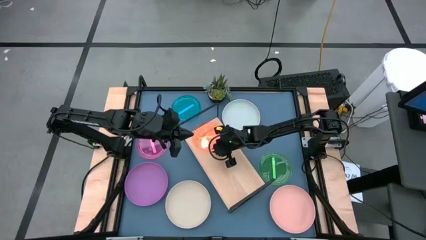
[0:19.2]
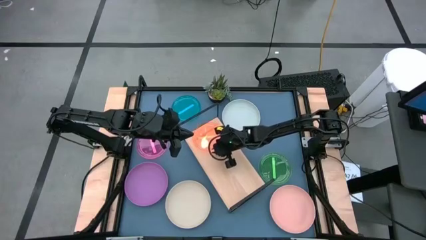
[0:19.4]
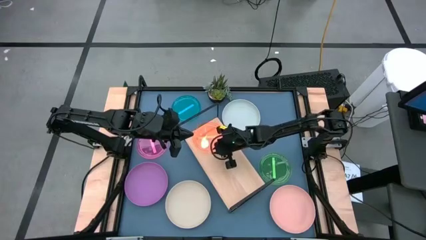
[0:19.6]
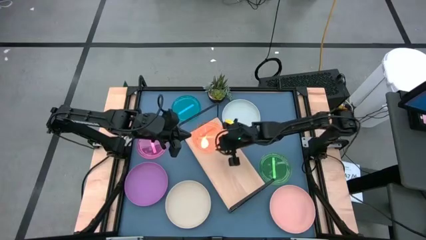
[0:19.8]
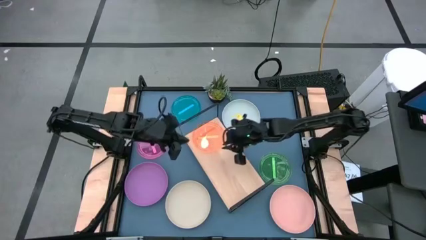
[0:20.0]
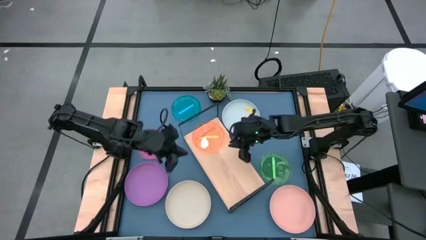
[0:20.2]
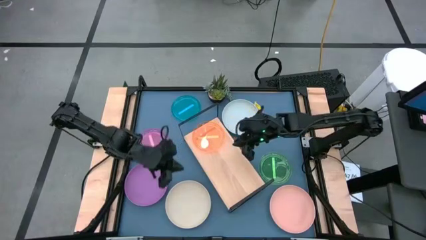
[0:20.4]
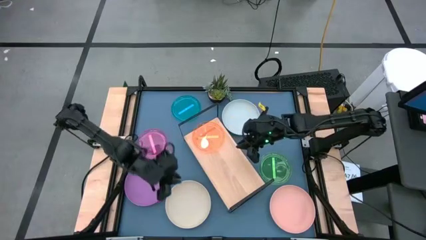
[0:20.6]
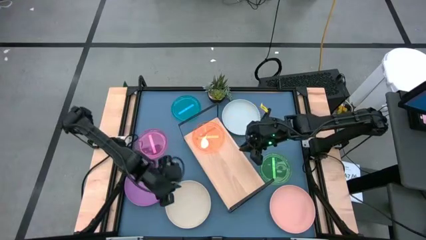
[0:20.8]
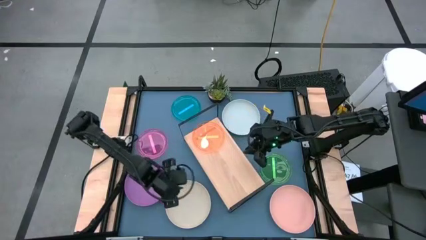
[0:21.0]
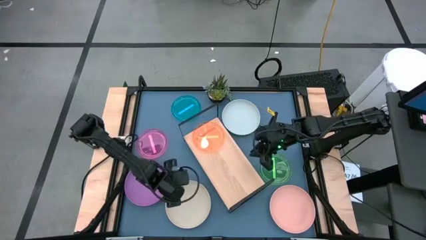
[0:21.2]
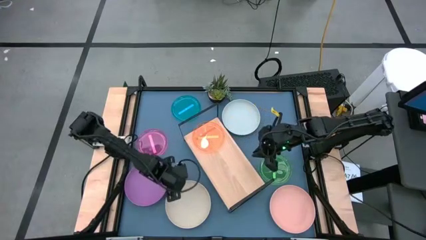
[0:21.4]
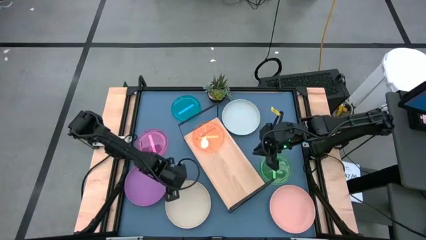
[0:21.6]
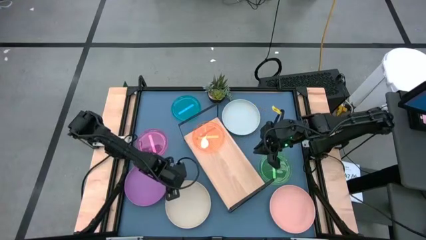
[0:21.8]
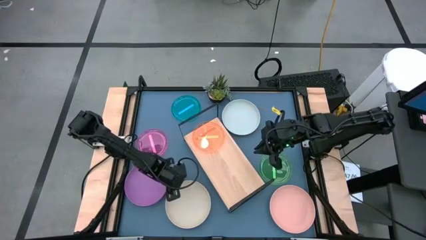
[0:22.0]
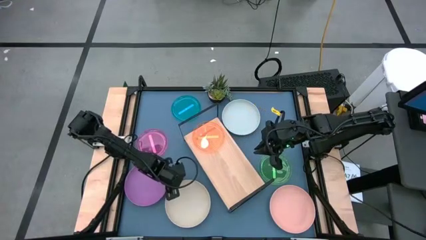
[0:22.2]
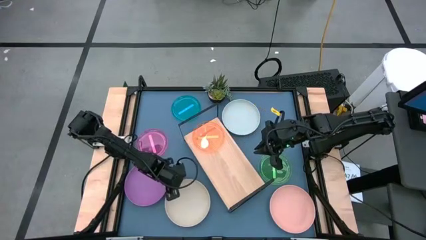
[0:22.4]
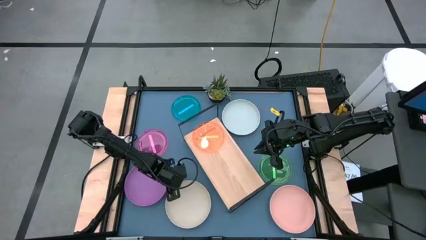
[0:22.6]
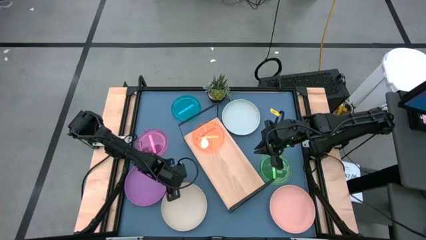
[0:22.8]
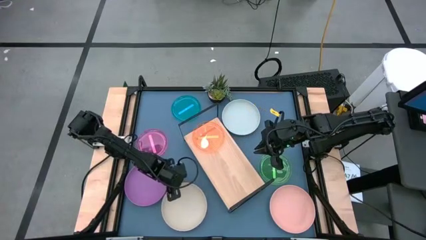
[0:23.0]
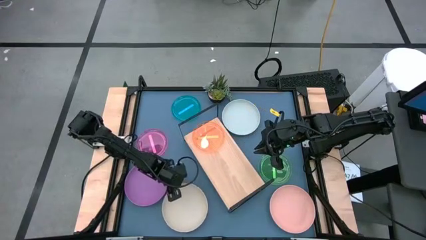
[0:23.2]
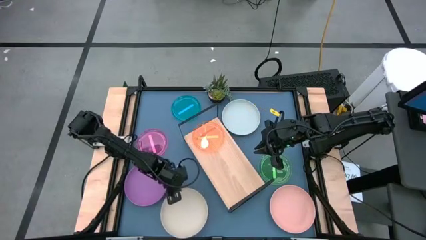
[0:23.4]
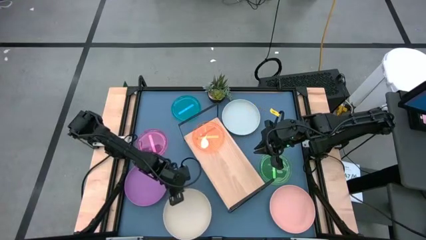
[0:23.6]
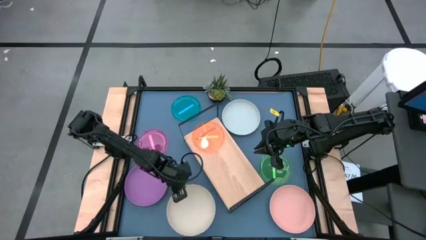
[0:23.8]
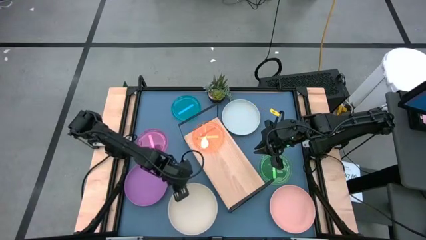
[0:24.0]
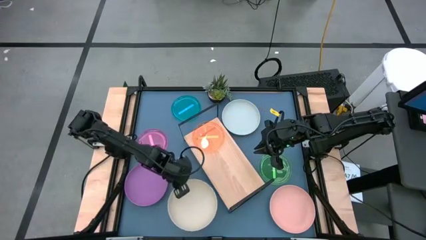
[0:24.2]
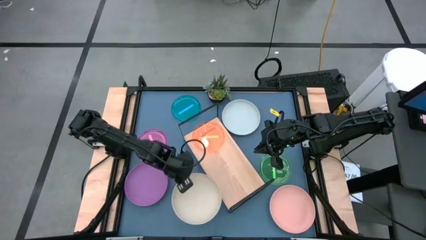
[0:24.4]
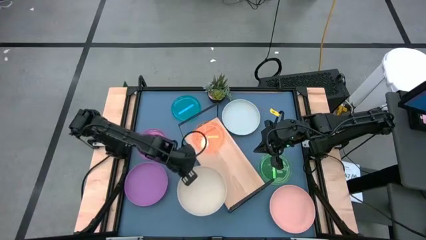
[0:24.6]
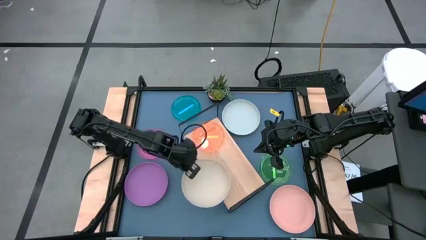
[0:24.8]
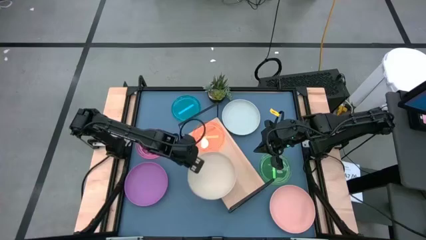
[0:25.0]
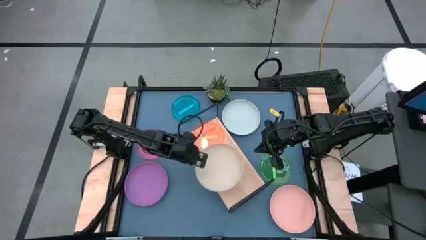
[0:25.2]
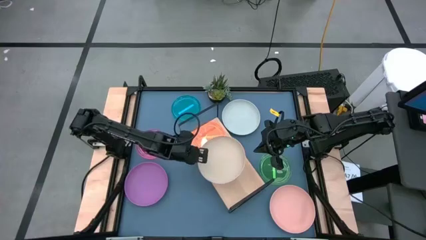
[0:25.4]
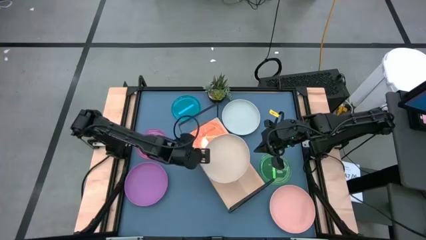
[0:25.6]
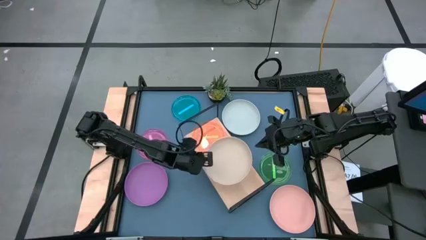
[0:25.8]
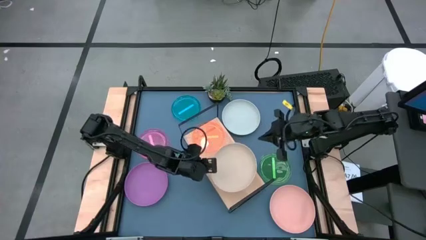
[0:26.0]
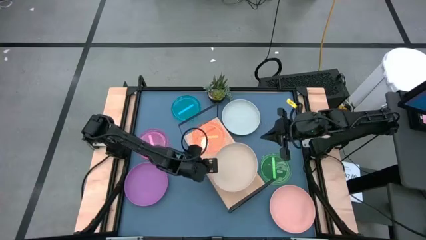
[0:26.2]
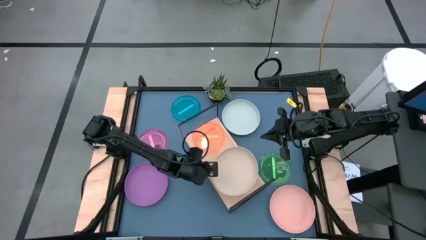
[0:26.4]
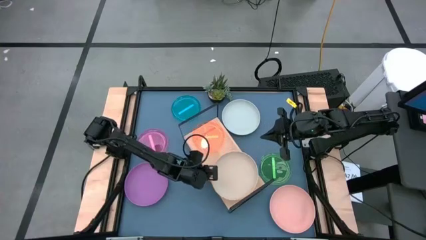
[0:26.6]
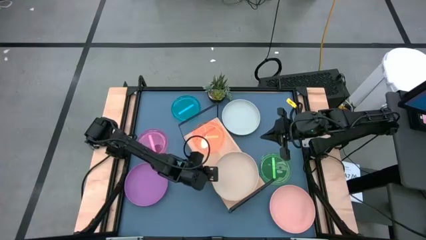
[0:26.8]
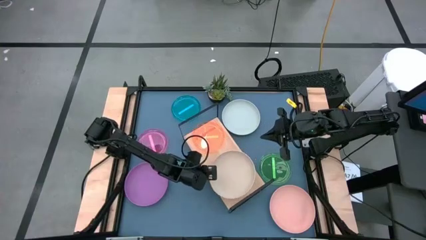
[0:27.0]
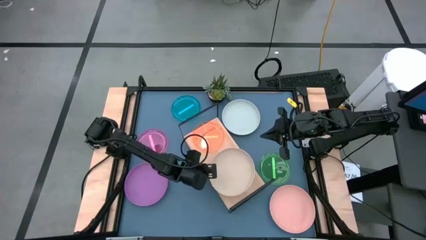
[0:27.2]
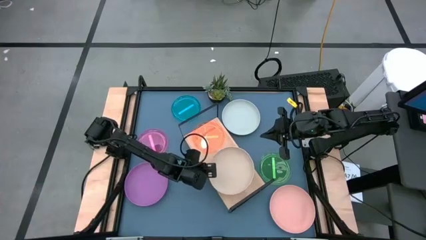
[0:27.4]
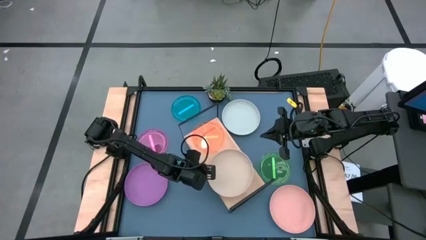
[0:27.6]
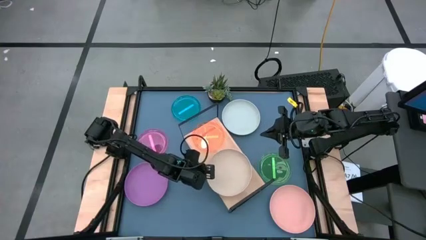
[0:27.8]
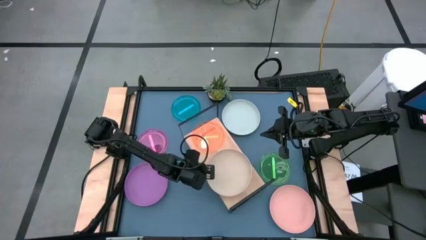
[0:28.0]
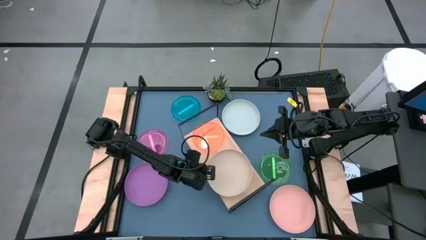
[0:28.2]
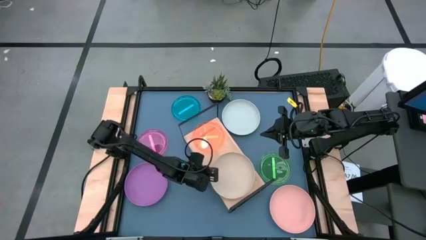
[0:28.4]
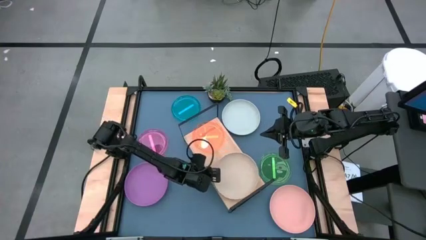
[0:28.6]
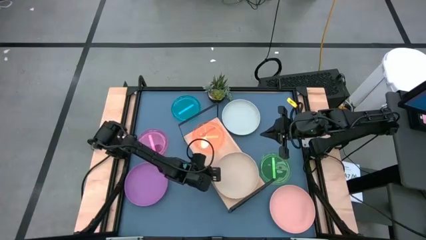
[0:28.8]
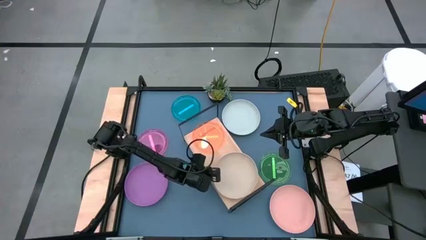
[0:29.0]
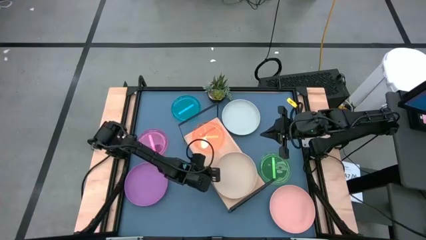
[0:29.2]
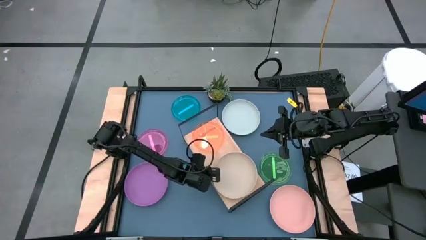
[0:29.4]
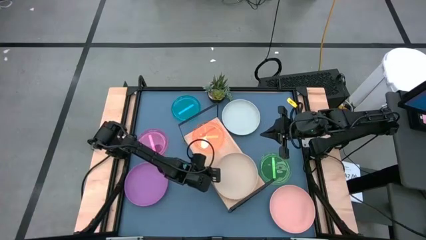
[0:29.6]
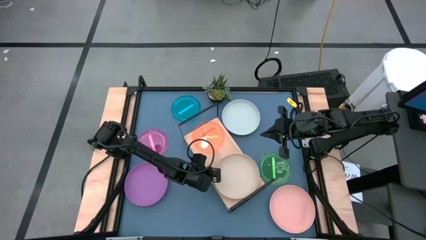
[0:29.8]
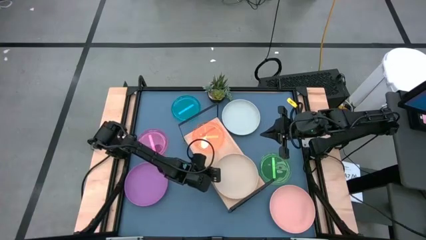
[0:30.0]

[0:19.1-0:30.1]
Task: Place and stack plates onto a shelf
Put the large gray plate on the shelf

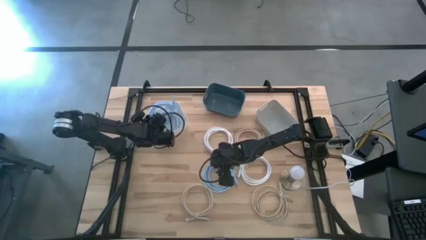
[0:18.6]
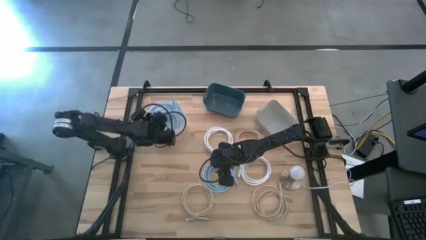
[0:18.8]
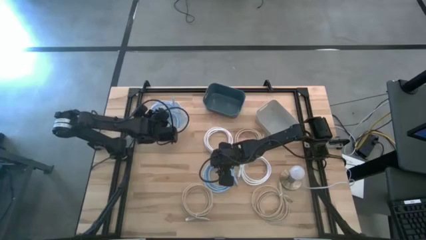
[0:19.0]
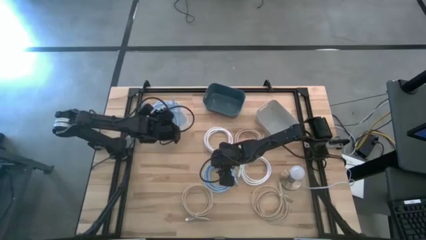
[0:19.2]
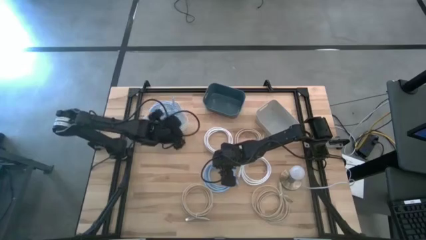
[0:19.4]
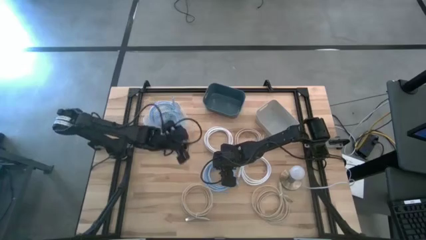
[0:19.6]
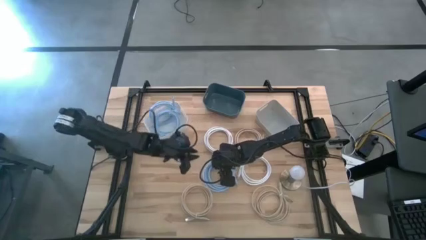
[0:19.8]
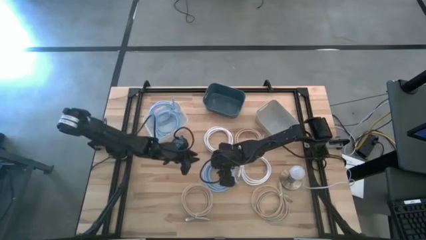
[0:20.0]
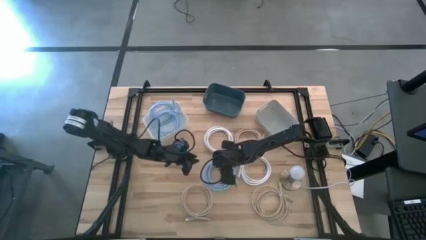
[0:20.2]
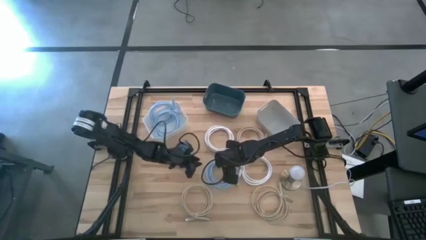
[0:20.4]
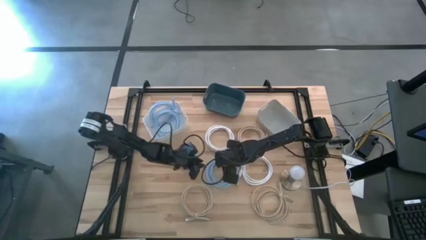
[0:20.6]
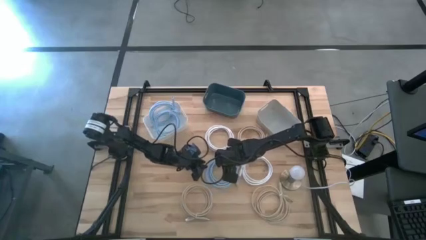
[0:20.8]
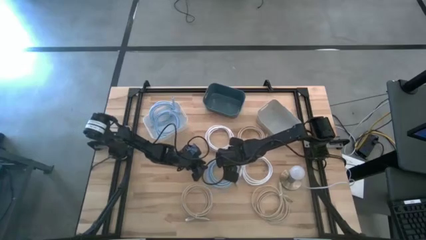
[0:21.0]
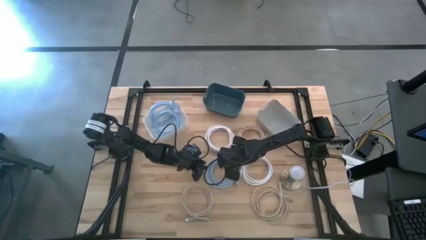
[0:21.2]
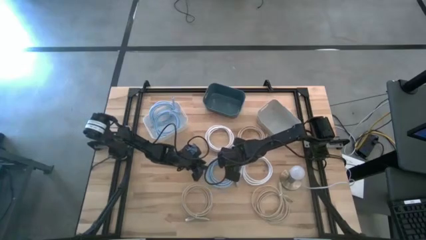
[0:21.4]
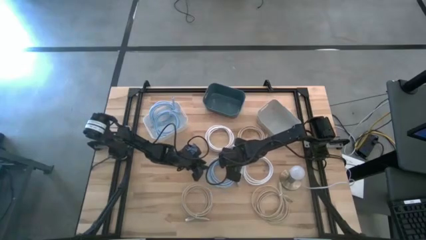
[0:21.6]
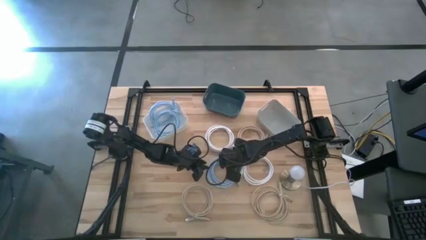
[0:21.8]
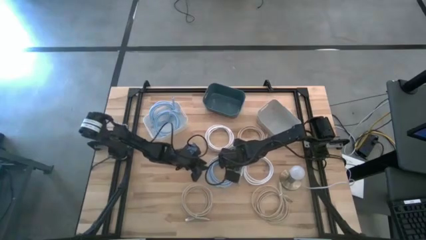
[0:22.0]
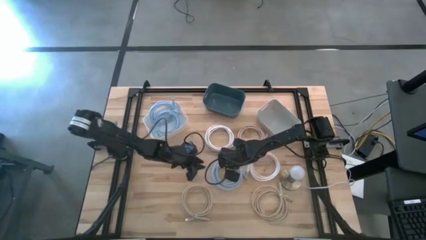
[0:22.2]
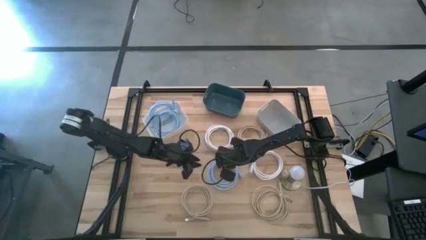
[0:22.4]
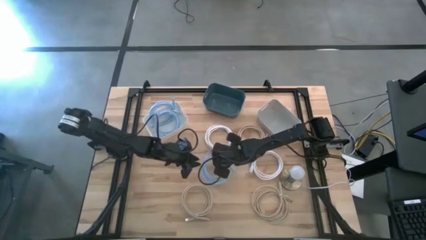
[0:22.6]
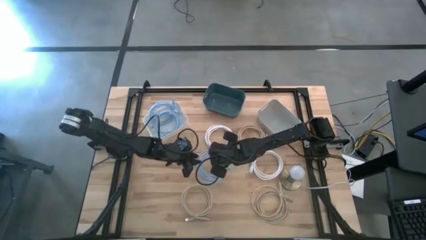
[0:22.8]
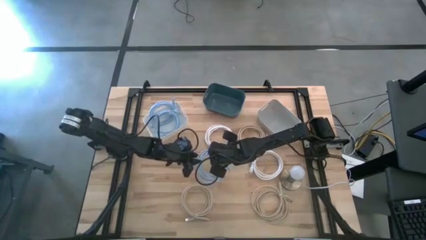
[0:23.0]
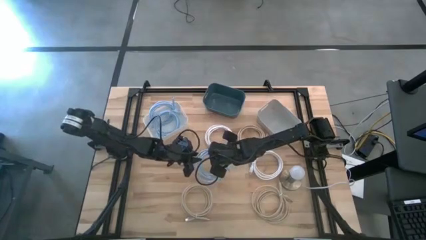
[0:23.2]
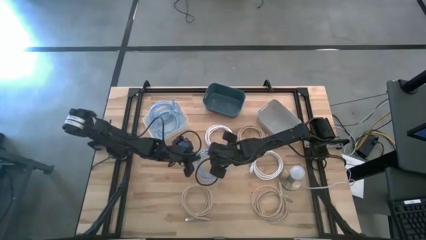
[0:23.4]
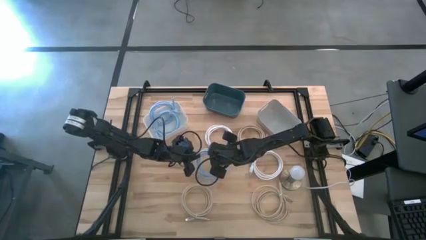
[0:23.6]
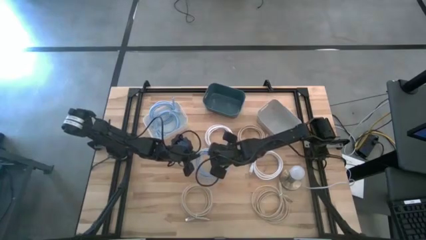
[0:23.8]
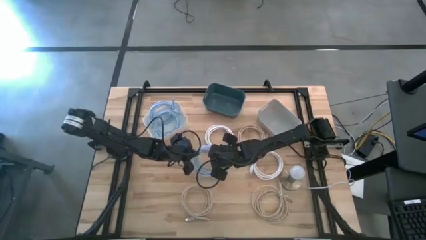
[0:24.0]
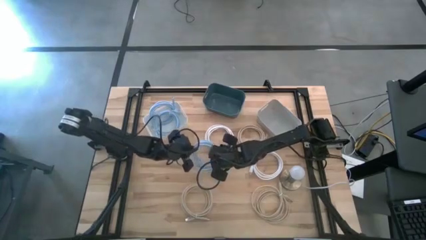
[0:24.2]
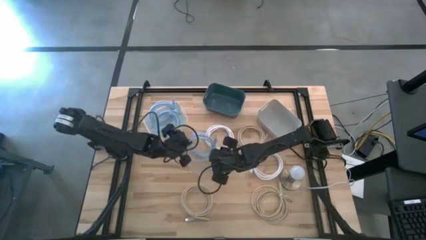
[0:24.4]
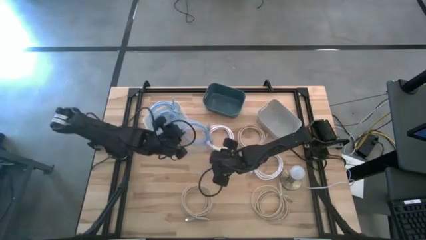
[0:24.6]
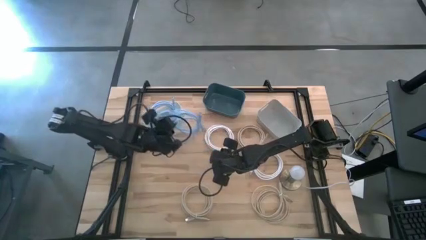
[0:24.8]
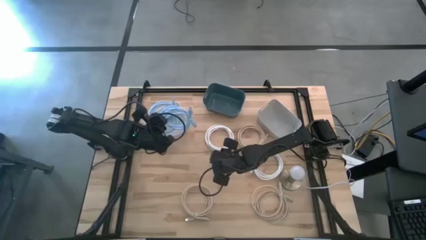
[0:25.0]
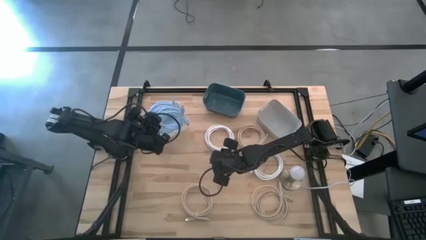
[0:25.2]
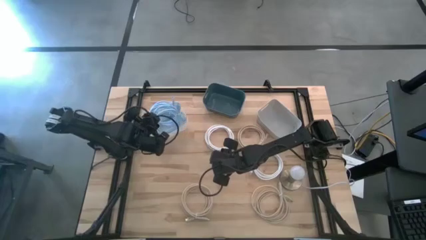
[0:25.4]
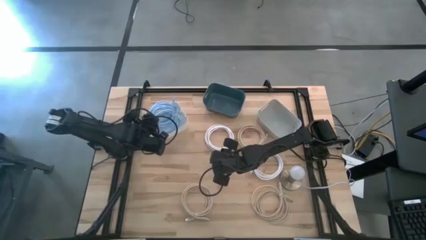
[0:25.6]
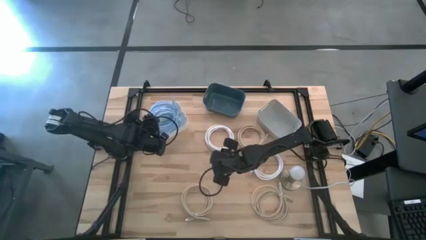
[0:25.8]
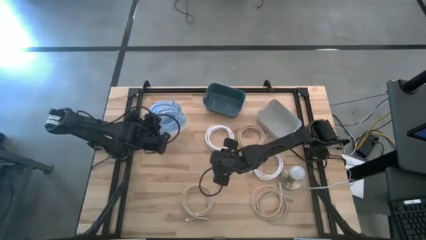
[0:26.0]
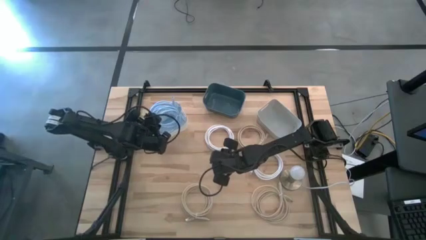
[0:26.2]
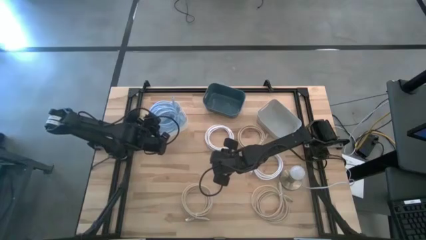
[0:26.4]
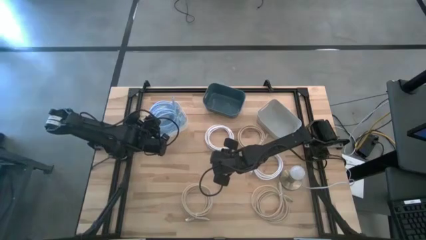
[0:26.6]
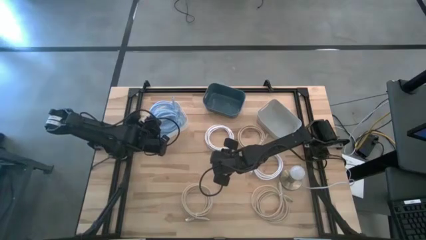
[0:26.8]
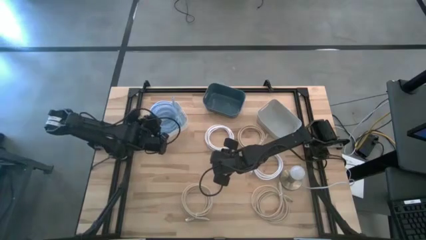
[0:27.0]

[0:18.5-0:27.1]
Task: Pick & Place USB Port
Put the light blue usb cable into the white bin
